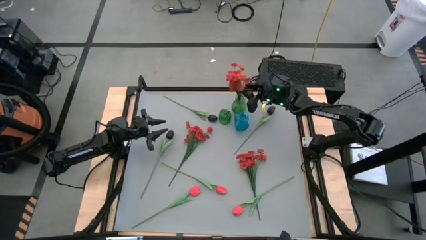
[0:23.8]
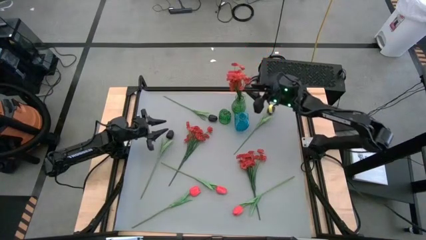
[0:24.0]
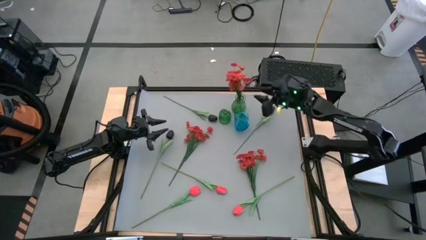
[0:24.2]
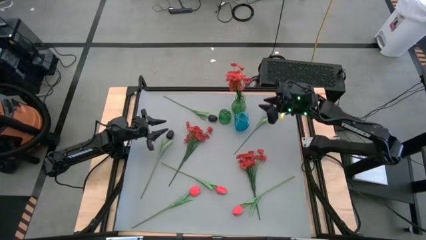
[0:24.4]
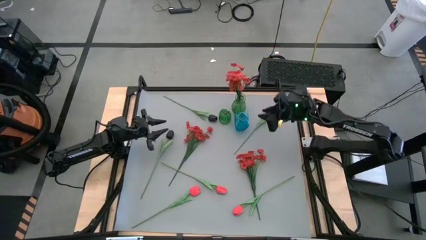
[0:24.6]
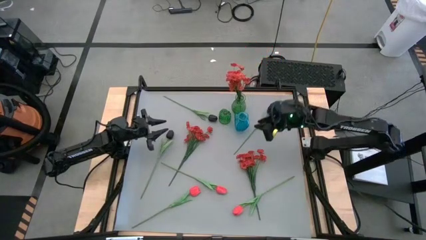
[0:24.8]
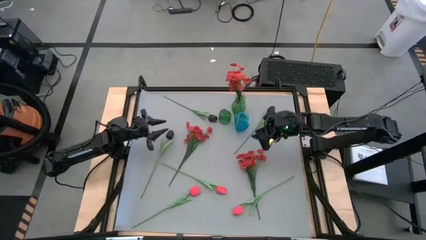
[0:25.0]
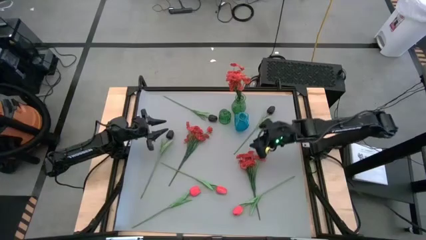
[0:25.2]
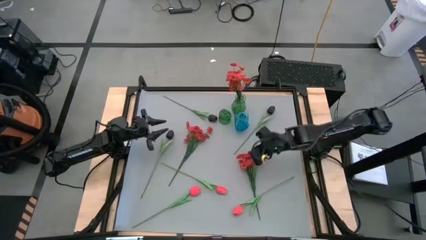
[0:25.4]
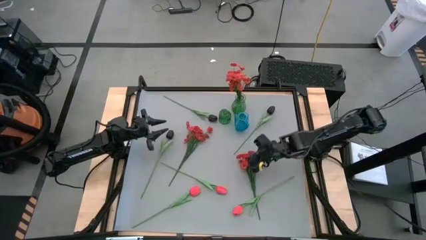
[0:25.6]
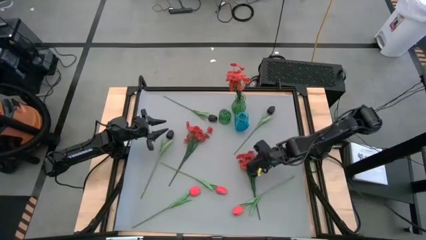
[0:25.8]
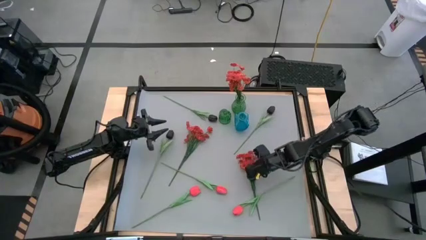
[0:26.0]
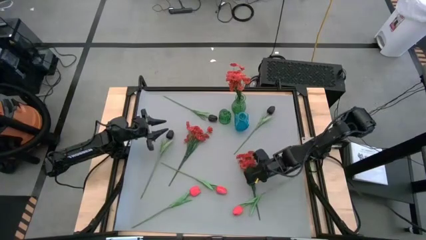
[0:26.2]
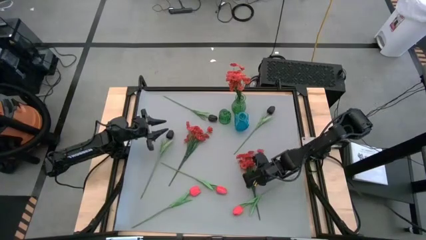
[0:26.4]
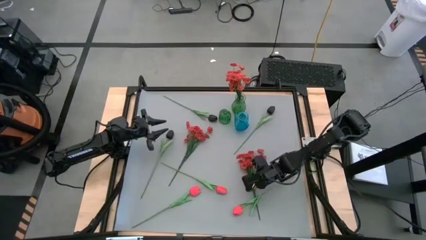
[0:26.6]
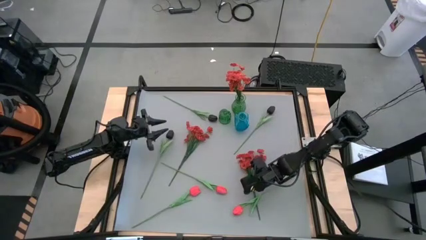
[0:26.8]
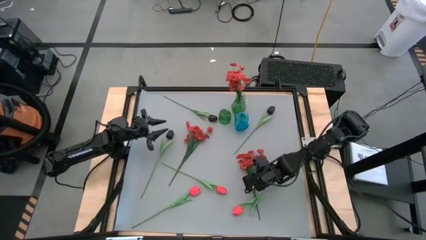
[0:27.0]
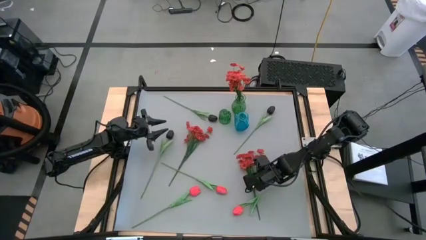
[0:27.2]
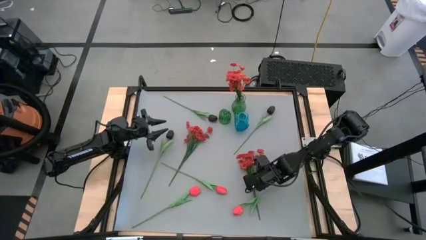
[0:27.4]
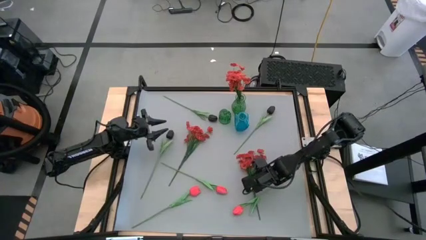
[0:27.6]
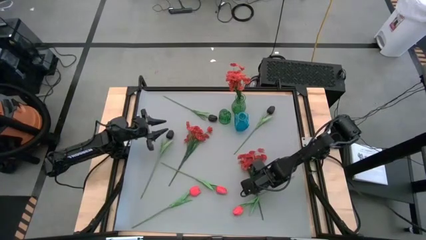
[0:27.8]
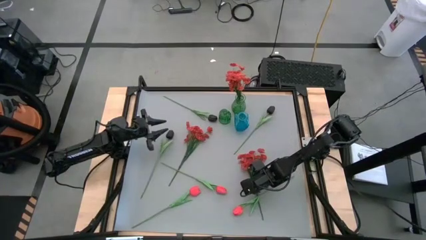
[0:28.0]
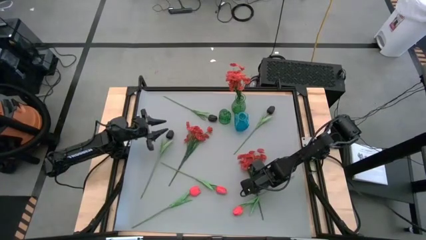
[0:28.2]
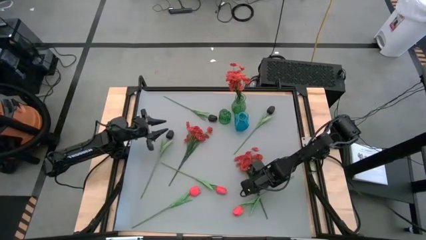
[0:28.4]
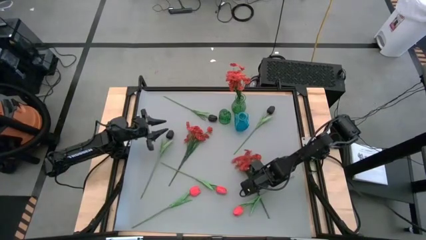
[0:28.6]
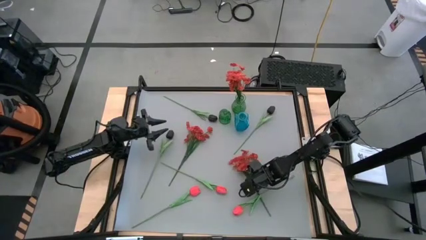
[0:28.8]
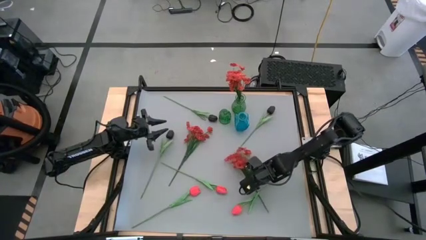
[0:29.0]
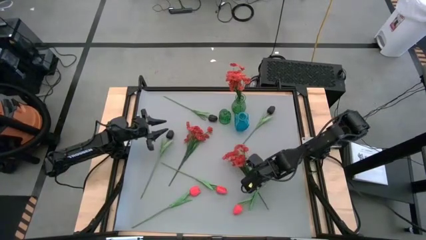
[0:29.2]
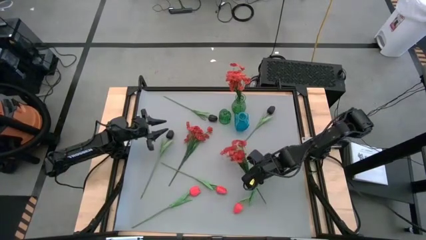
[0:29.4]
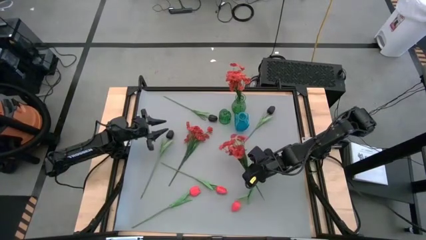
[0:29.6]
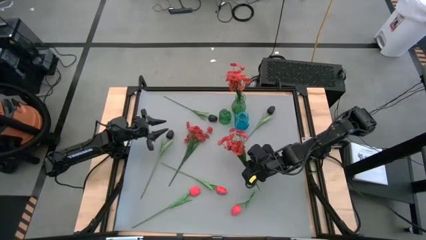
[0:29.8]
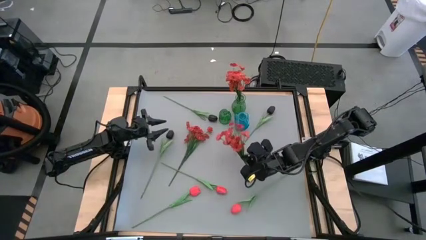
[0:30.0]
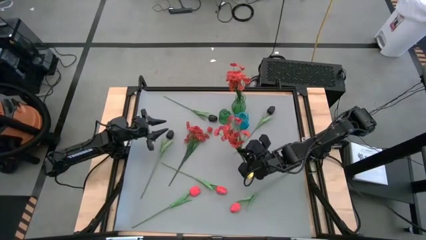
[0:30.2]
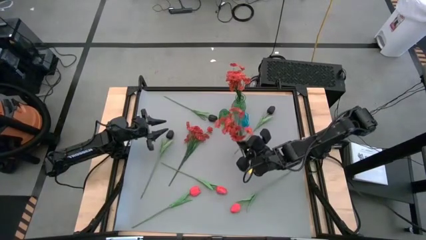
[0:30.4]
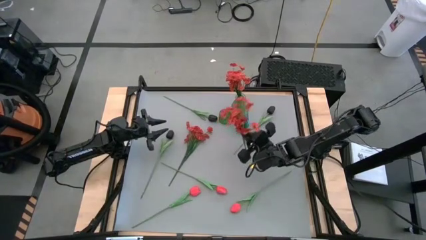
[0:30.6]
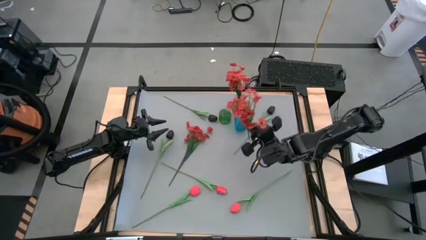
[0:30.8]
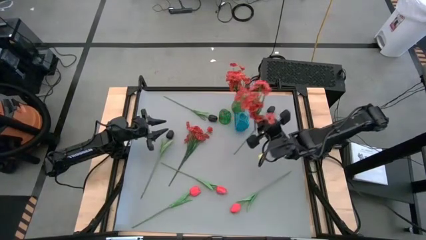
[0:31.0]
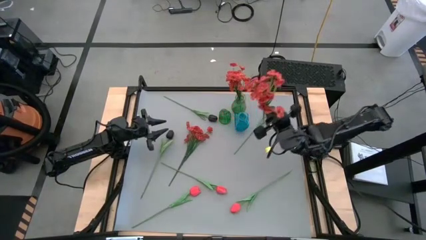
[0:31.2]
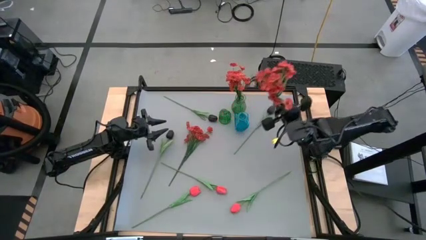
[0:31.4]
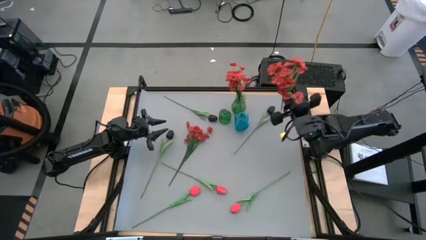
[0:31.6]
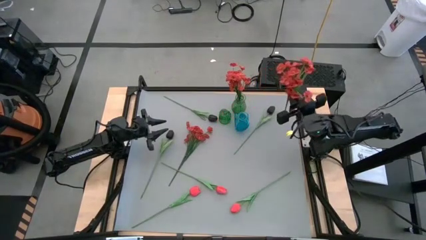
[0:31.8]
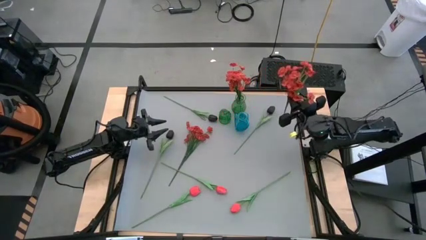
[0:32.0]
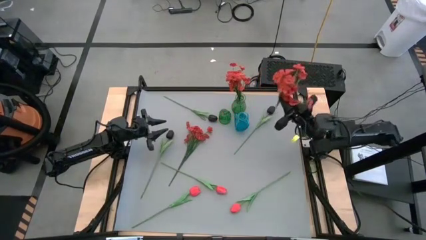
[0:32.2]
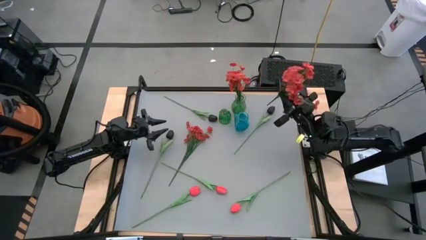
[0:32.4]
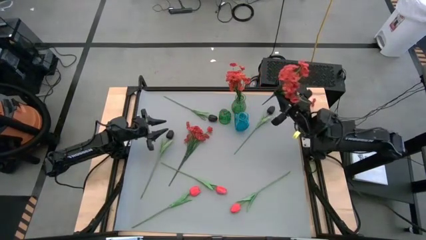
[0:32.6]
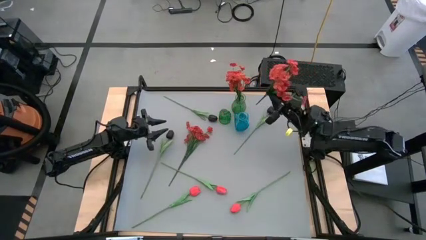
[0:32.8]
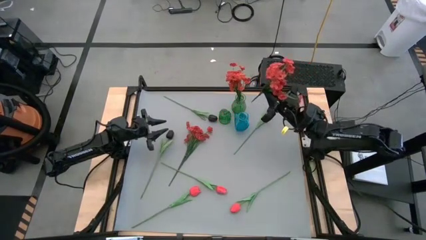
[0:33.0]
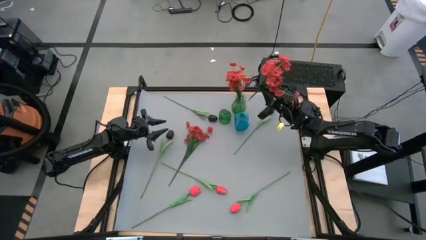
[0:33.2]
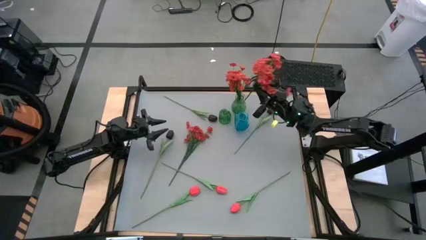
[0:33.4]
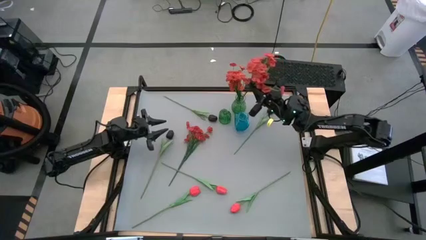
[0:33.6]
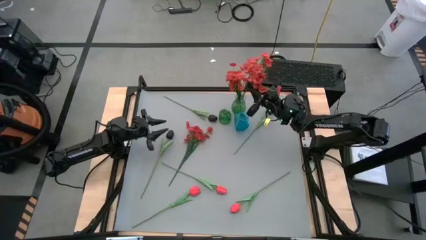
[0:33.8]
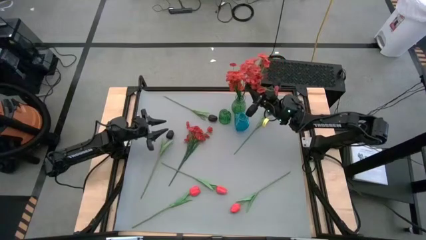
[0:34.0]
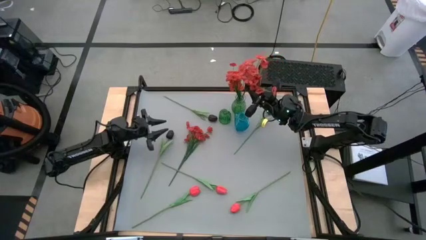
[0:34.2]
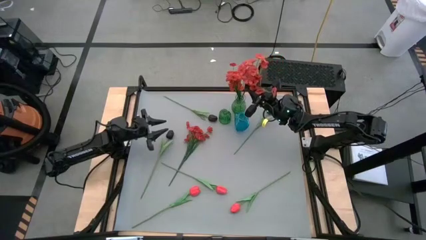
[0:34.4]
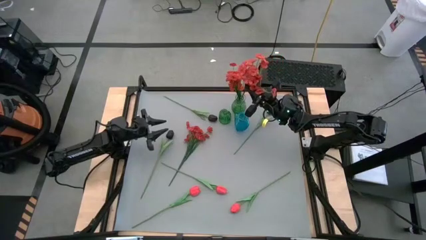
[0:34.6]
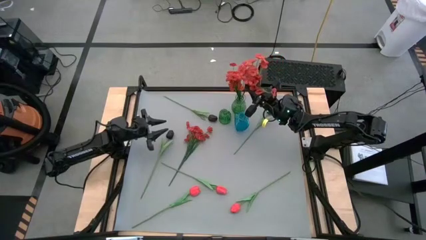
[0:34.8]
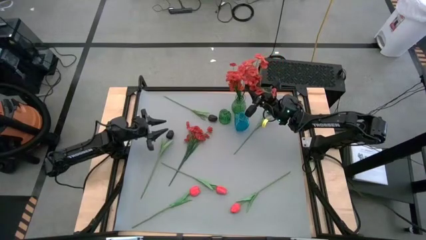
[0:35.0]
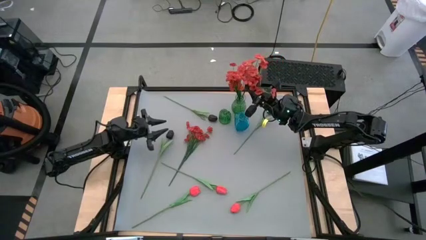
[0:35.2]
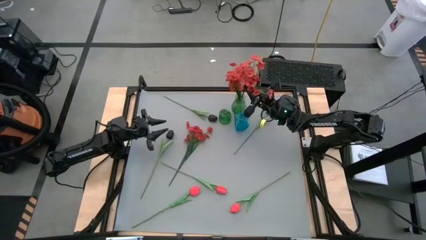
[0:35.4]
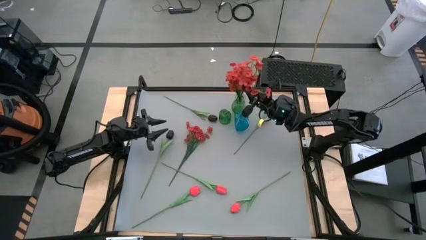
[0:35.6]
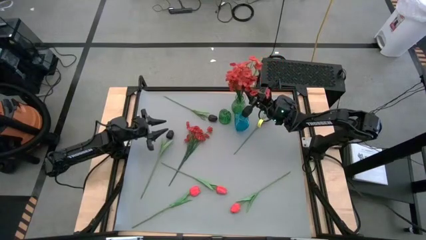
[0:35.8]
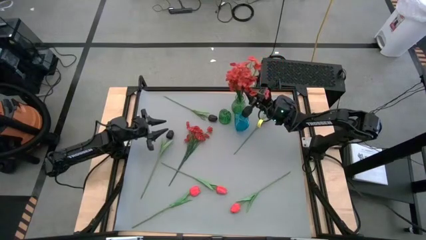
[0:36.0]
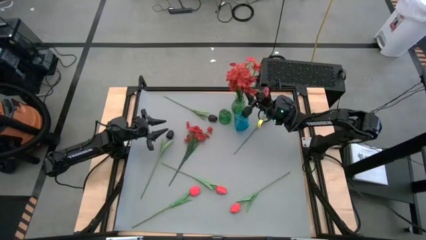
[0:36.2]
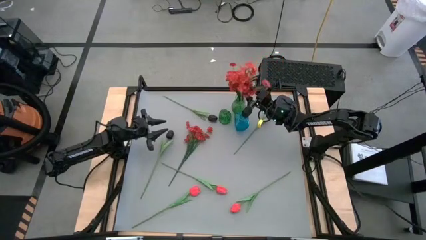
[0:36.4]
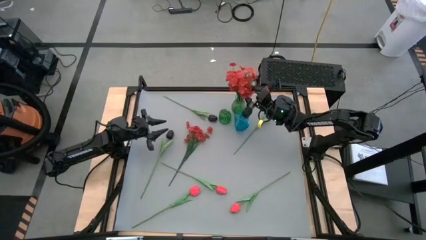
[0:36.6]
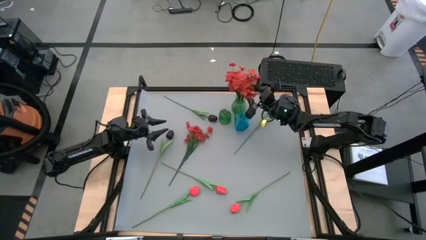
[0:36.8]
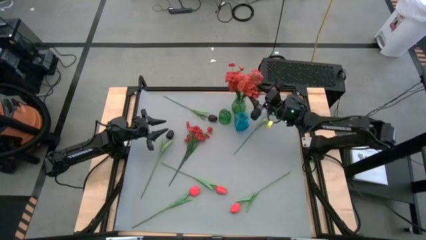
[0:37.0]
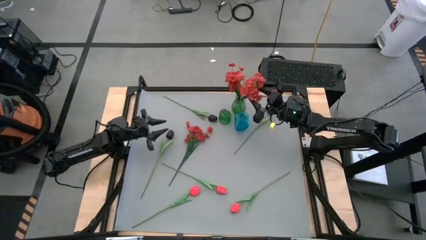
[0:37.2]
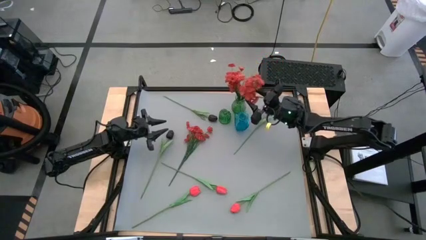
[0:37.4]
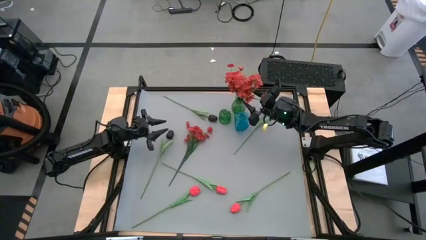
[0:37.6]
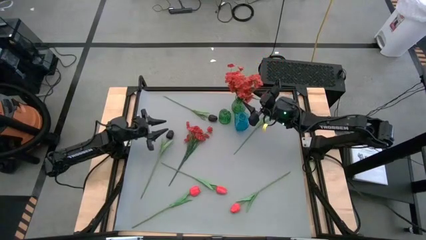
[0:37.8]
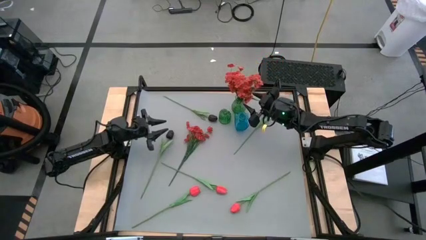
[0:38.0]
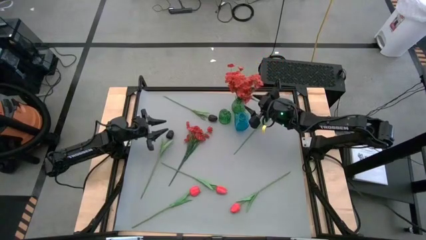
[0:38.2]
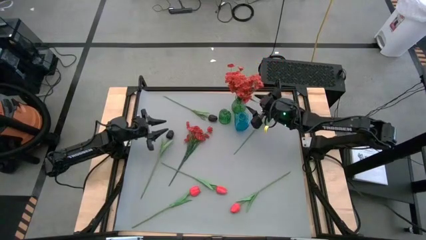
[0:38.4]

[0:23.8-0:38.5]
Task: Sort flowers into vase by color
Put the right red flowers into the top green vase

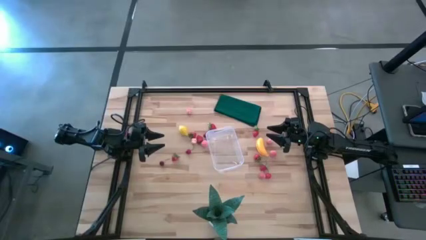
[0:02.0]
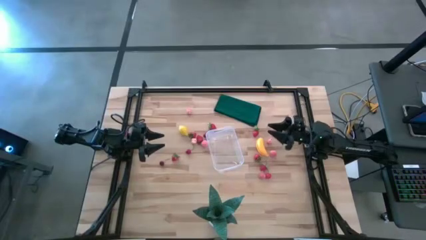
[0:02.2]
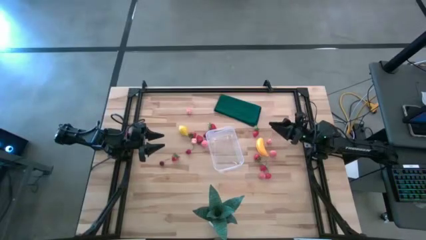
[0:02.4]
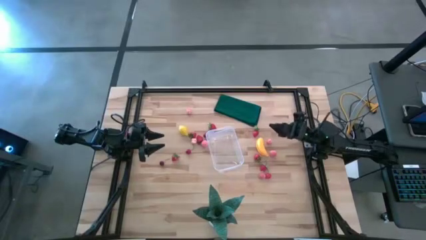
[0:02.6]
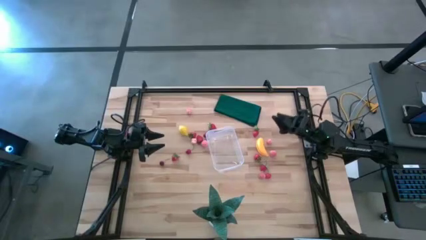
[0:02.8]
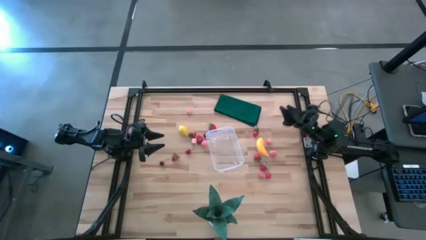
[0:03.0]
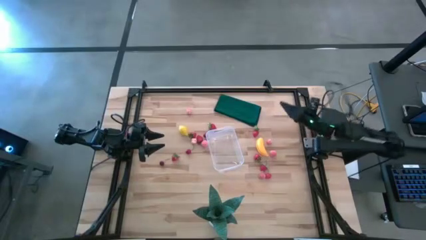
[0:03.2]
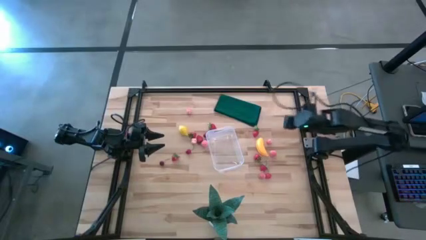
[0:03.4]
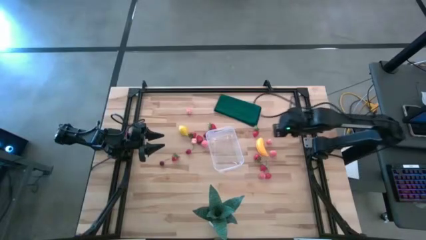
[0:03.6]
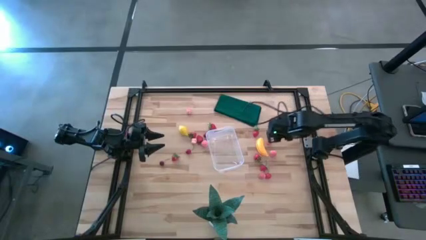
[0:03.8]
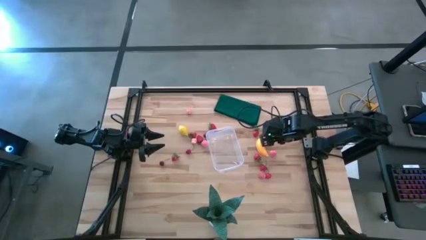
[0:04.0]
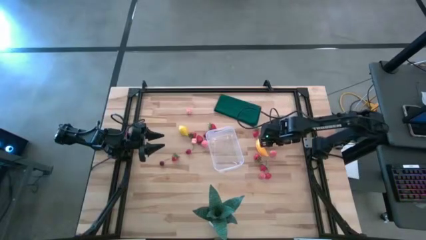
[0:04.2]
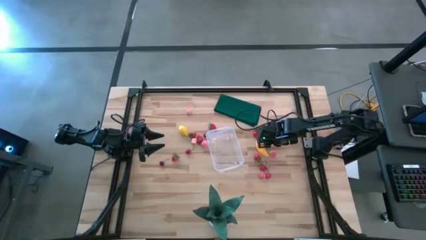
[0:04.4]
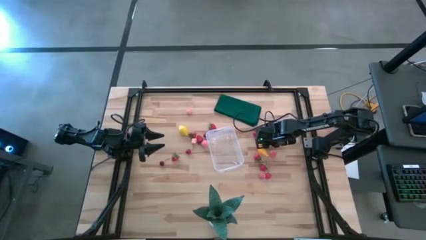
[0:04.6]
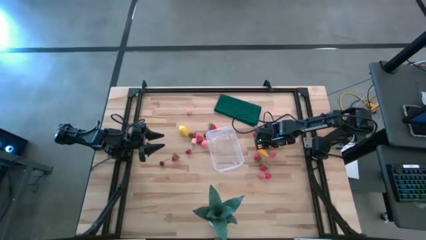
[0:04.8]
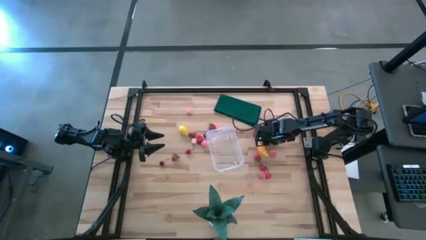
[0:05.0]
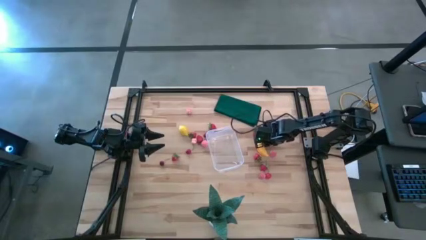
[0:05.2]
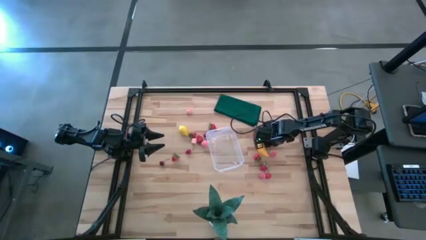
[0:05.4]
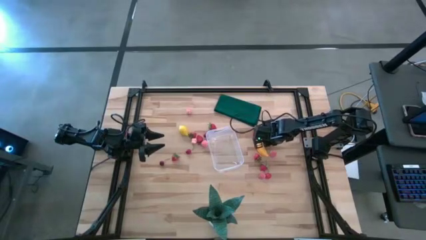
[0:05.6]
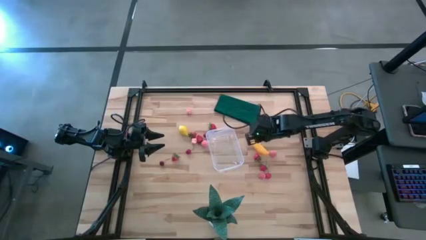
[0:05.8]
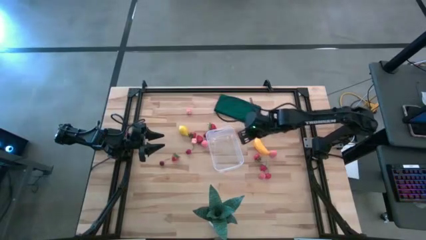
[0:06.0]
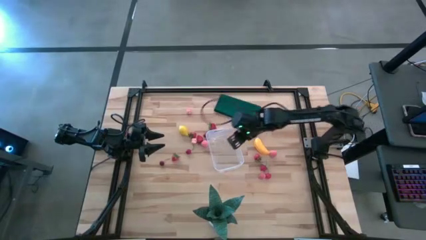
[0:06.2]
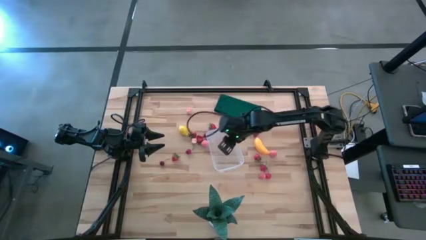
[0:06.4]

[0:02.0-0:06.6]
Task: Pick and placing Produce into tupperware
Put the peach into the transparent bin
